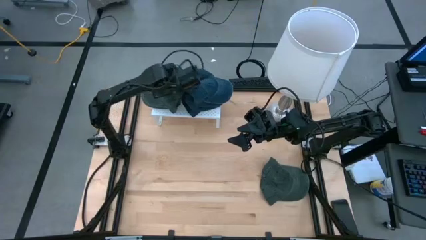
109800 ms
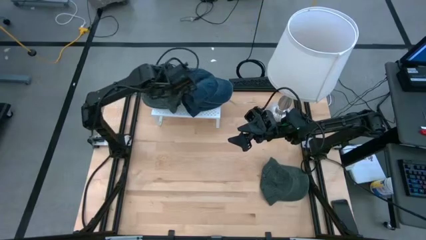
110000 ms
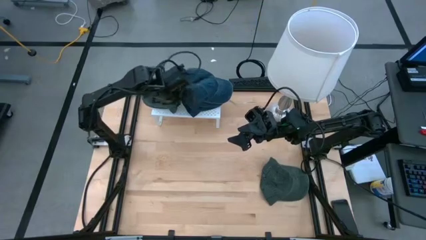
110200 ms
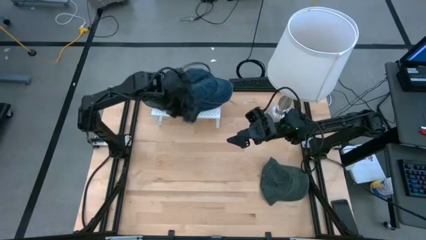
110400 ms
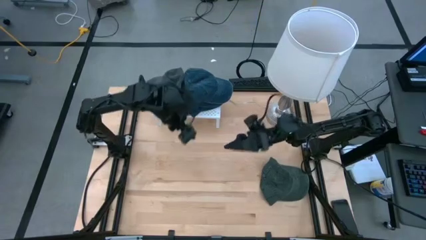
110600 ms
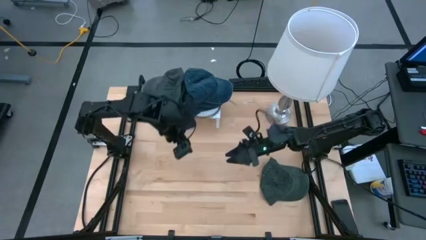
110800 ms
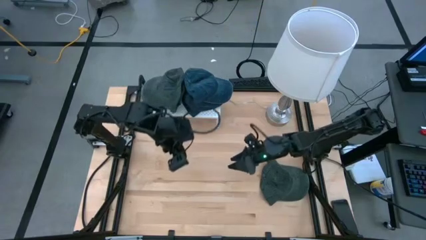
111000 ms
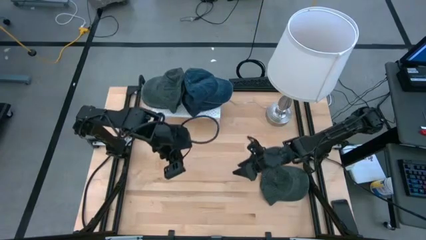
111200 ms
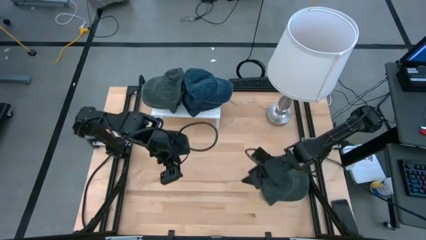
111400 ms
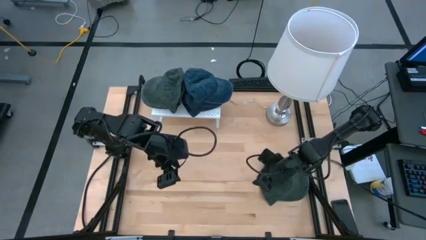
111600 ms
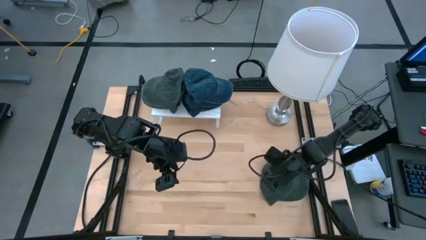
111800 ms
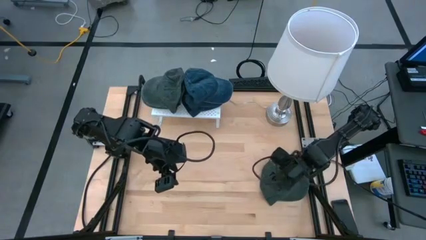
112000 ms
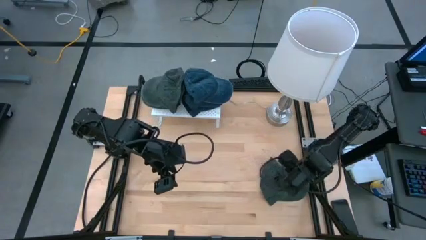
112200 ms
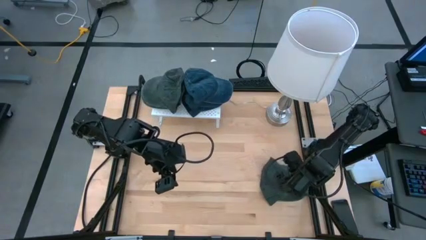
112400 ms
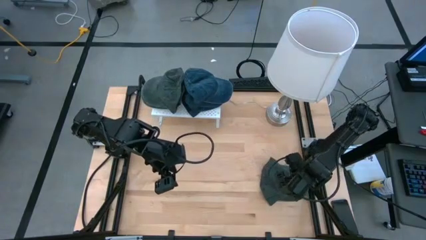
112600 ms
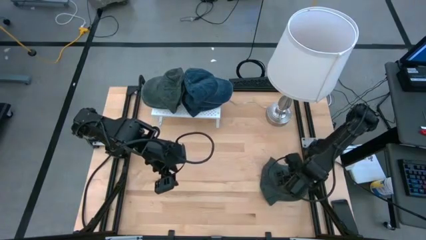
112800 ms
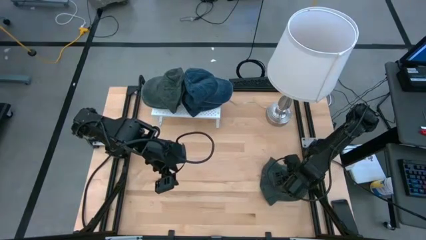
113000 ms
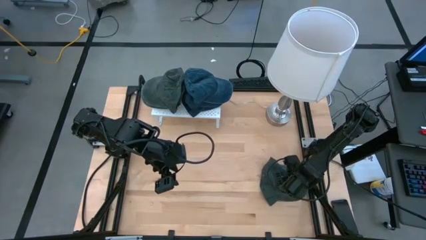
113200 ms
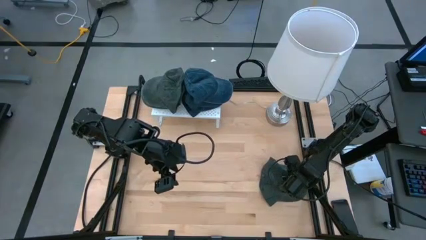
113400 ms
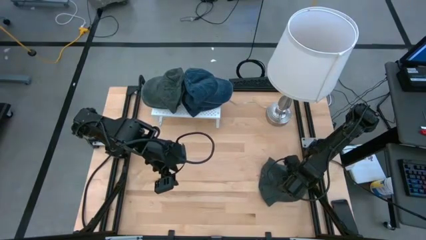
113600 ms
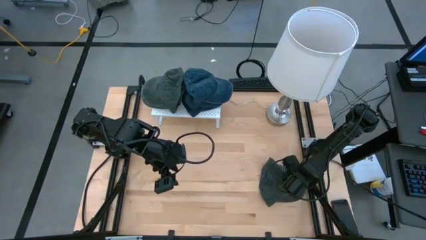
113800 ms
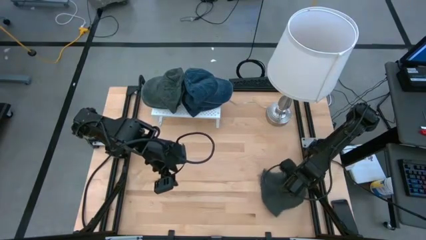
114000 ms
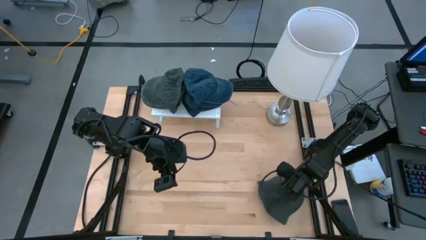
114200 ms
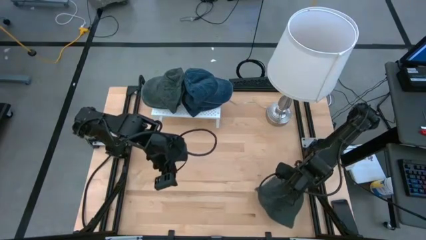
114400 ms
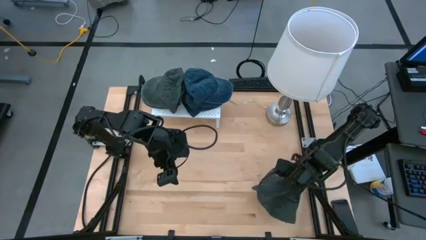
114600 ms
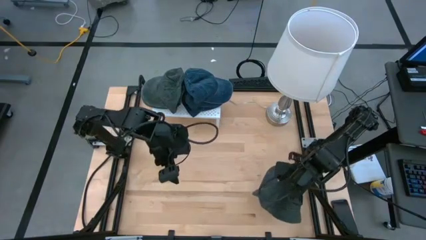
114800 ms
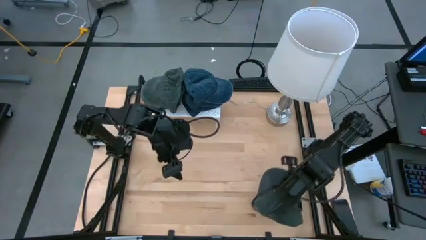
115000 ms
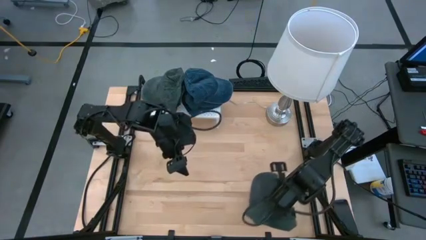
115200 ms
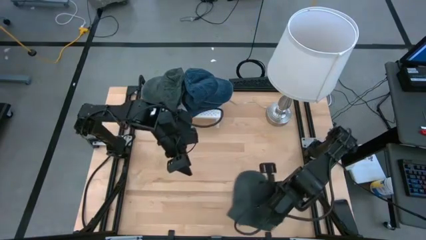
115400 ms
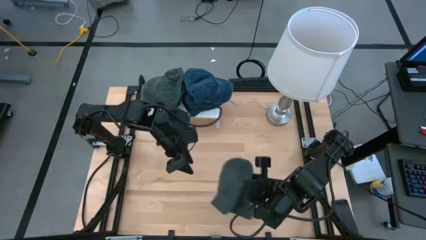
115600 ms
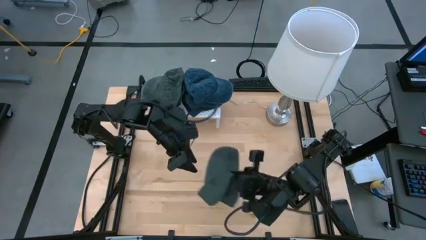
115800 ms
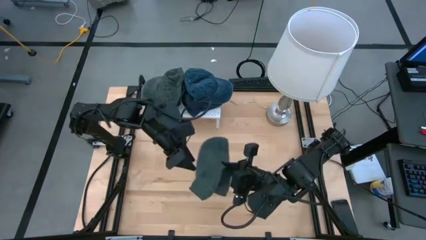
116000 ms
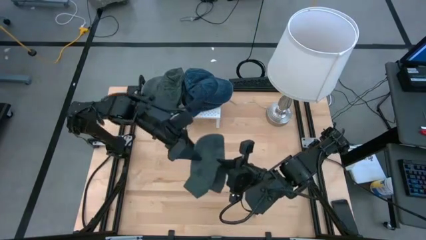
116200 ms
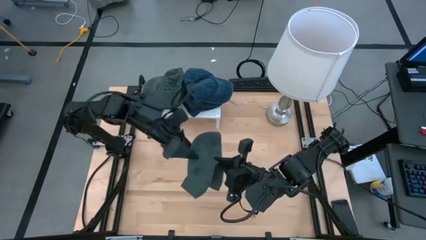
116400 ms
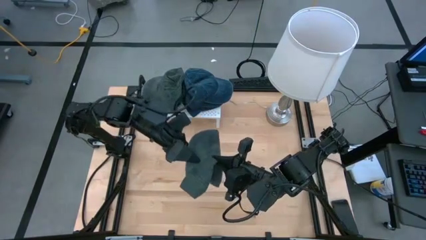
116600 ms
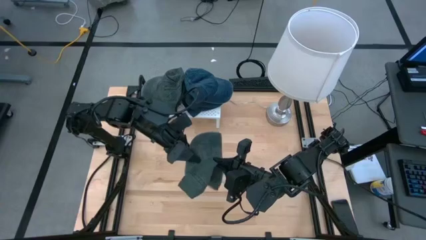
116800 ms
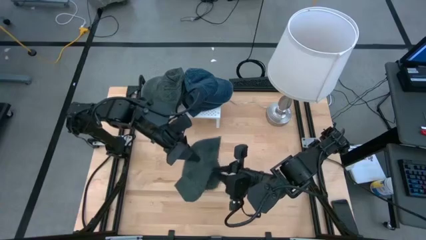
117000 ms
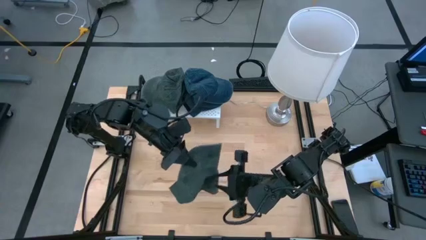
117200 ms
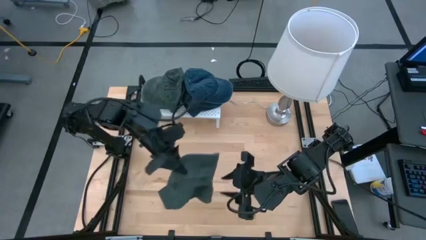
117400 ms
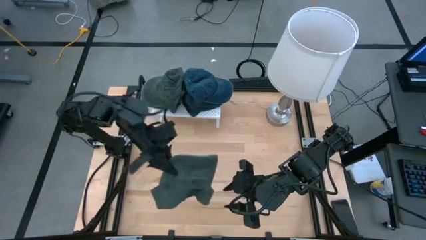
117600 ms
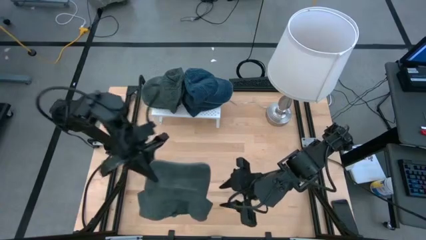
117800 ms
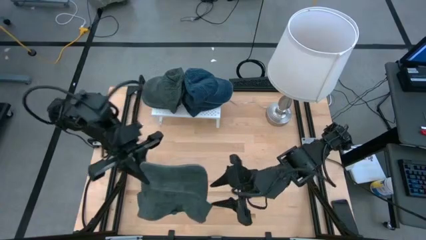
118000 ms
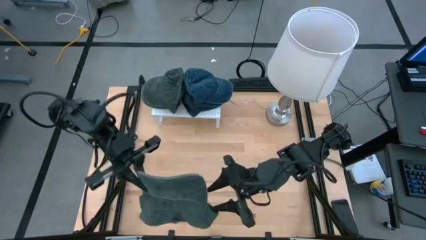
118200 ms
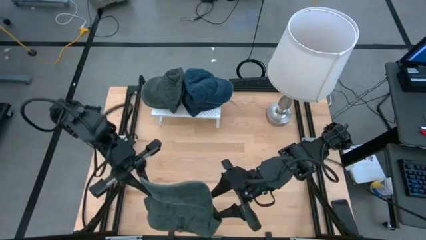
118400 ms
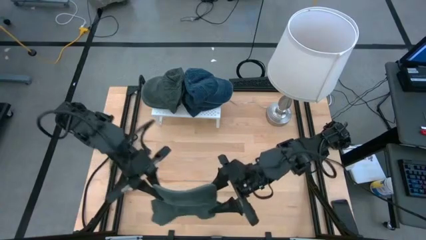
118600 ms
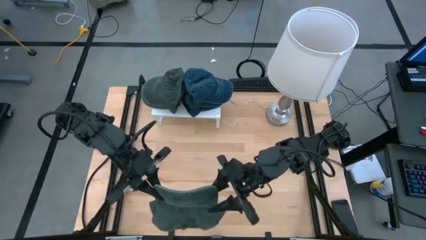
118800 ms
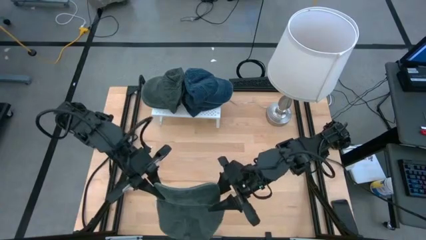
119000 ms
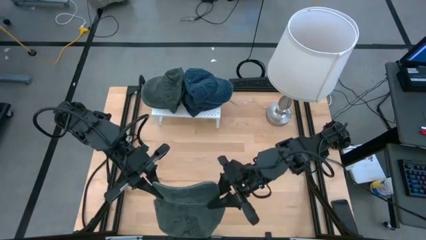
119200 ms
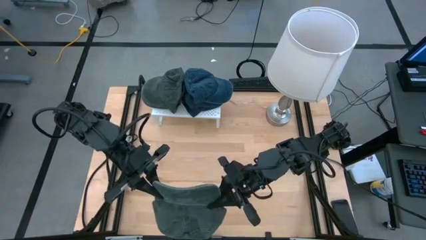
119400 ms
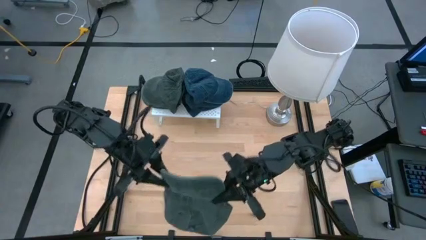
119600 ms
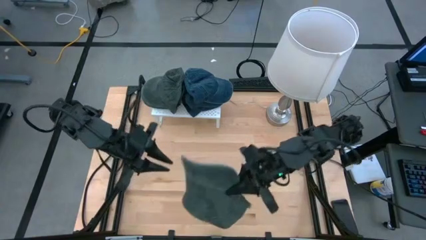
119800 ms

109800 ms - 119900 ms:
Task: Pick & Place hat
Stack the gray cap on the gray cap on the shelf

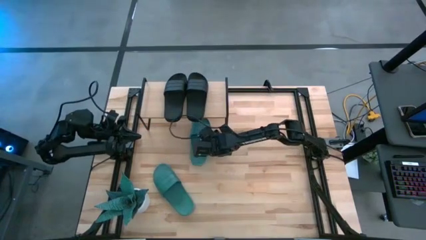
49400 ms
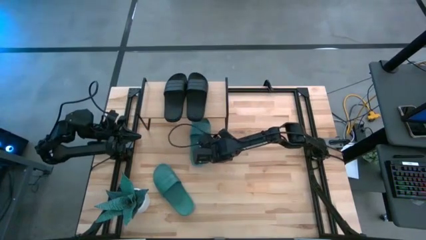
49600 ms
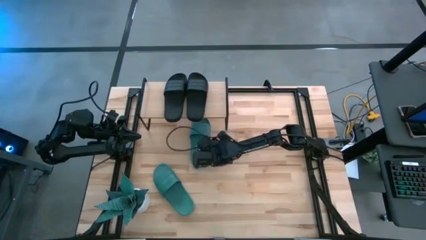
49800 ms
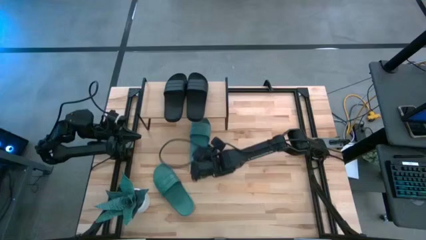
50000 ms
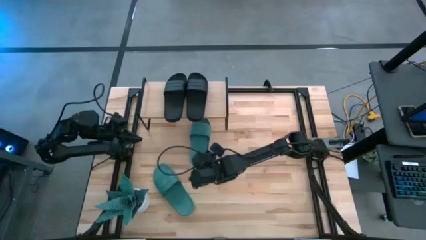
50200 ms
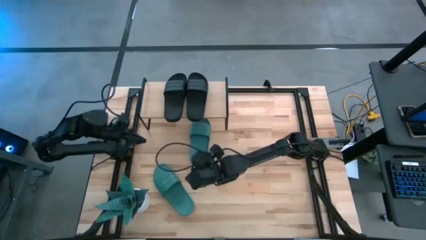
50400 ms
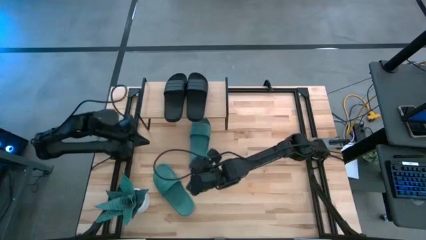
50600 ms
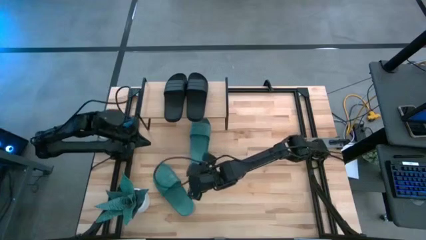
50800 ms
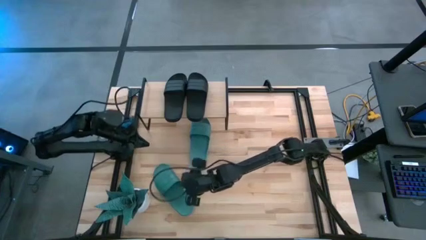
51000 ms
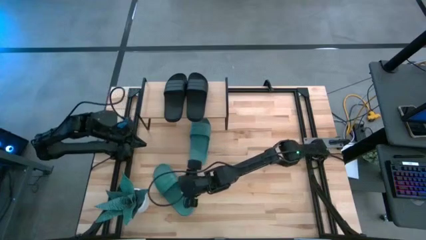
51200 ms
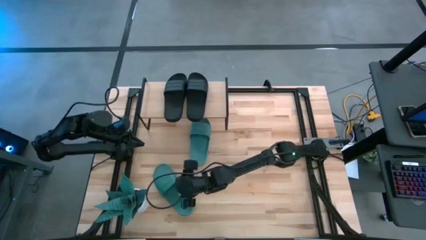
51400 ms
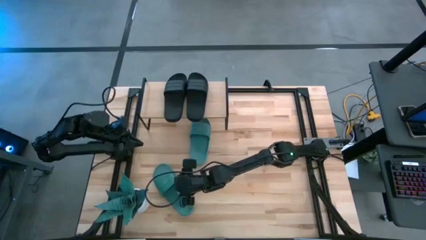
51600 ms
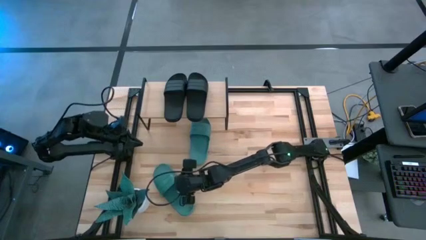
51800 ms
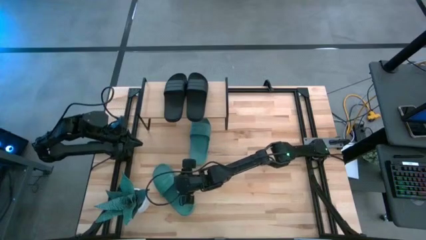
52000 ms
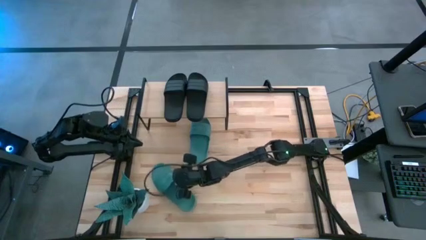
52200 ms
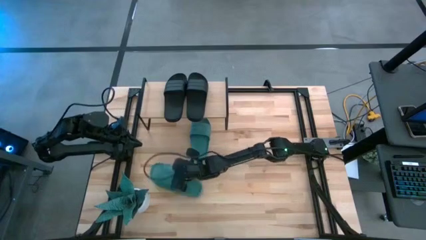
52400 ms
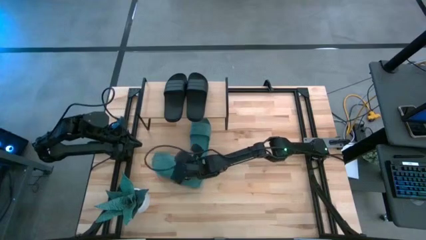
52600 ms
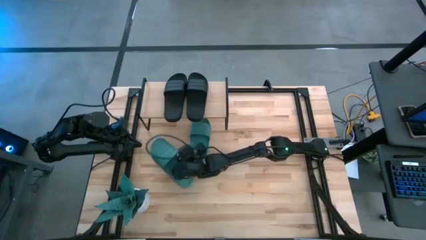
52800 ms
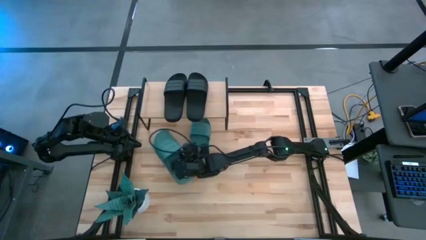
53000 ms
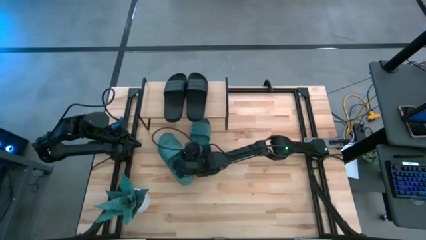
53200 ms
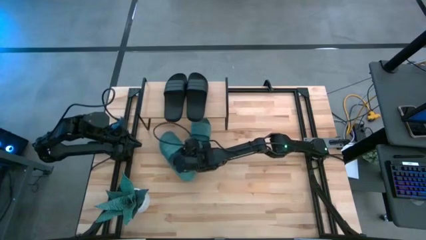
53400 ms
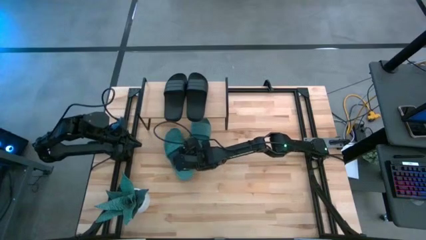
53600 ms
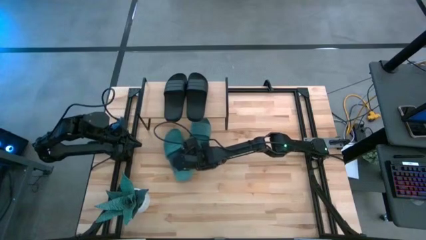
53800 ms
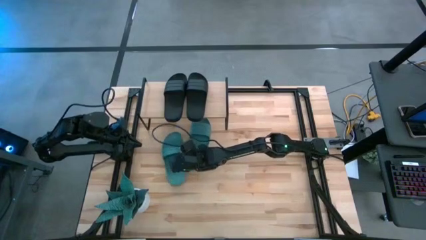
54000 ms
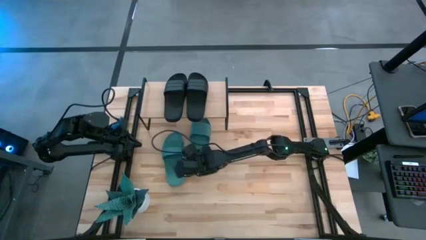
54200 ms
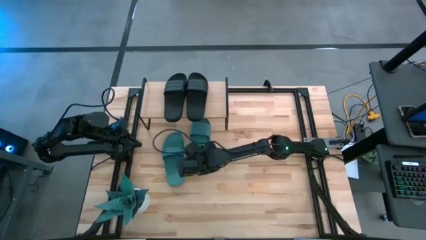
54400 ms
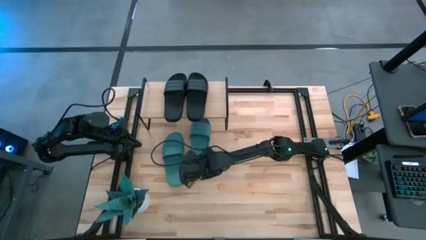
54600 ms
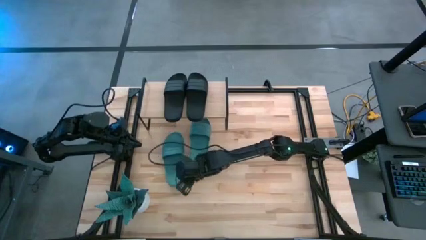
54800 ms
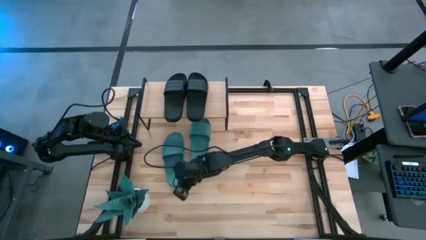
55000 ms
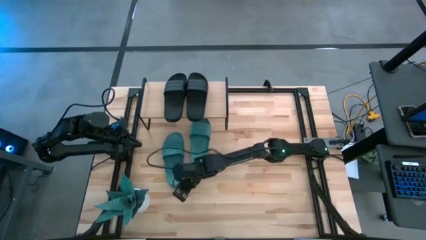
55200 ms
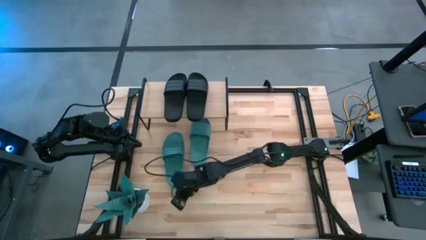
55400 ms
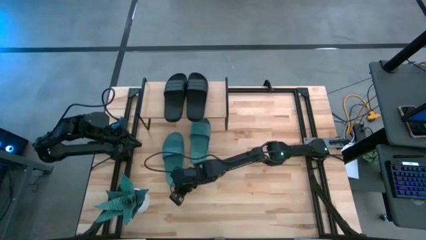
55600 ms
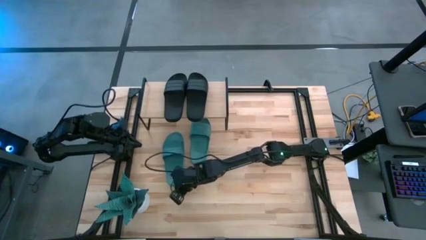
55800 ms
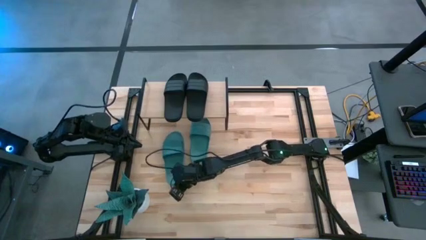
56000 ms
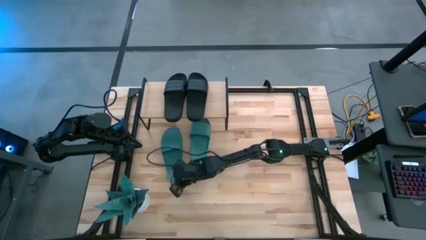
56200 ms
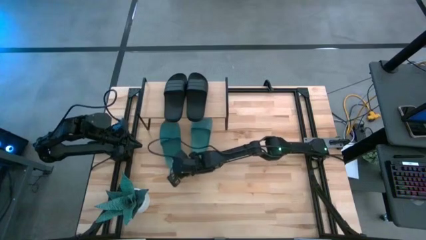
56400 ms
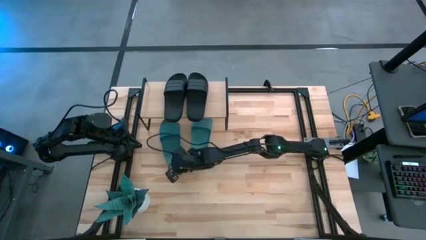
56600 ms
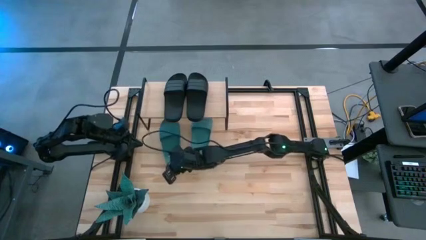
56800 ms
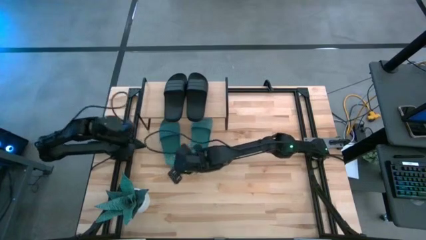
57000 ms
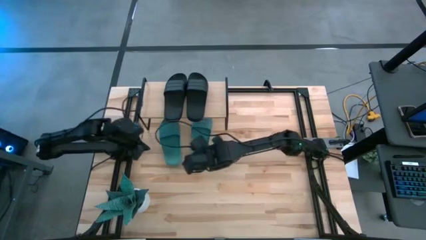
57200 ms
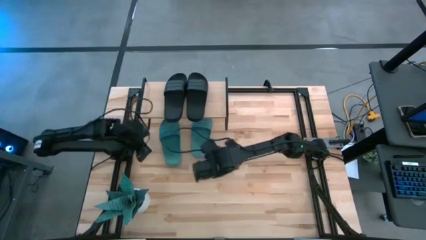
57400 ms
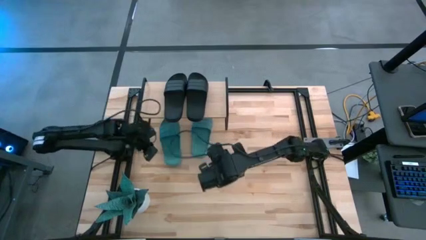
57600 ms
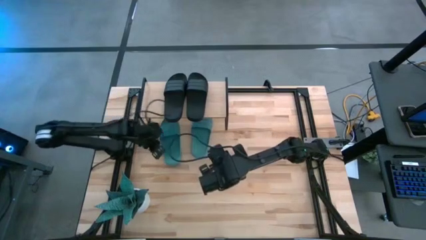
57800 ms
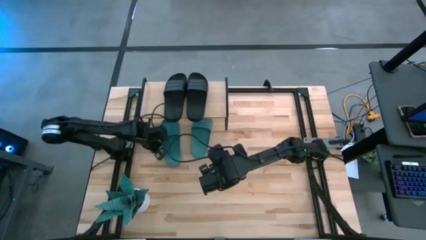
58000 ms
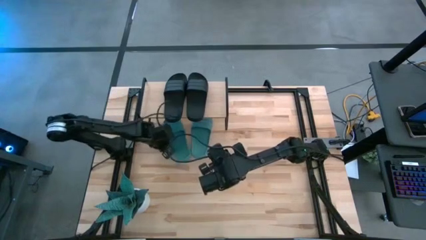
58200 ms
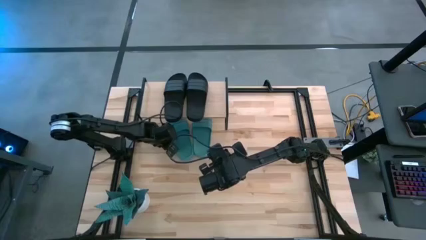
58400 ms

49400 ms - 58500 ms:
Task: Pick and place slides into the shelf
Put the green slide under the shelf
